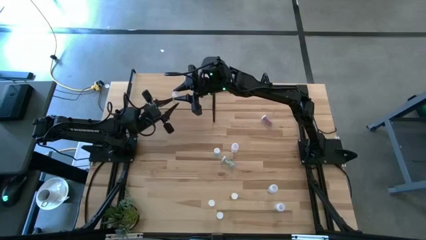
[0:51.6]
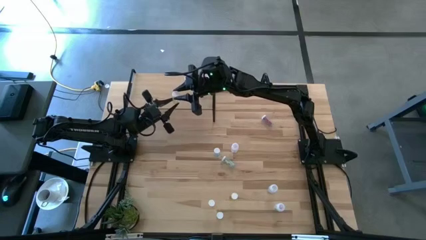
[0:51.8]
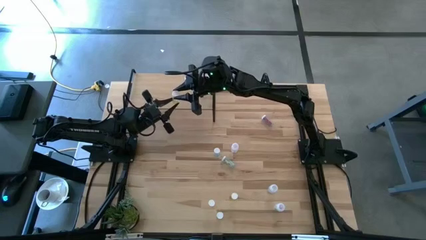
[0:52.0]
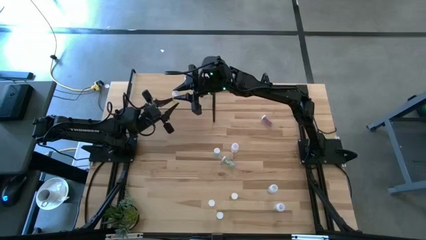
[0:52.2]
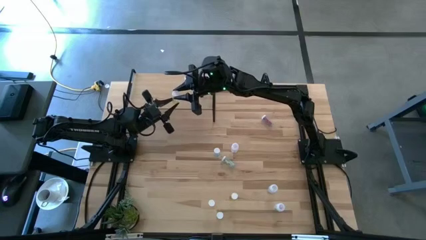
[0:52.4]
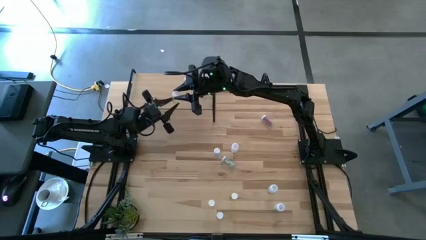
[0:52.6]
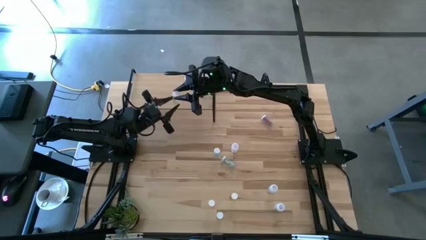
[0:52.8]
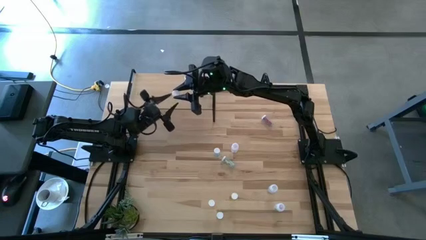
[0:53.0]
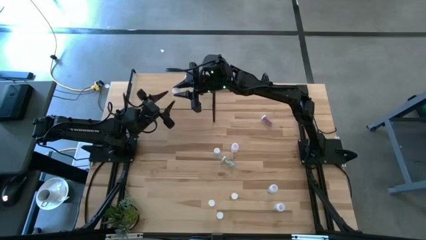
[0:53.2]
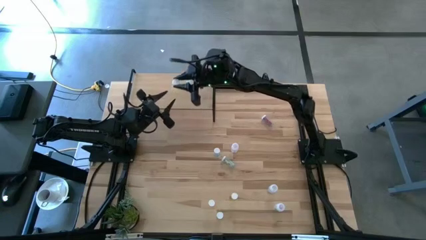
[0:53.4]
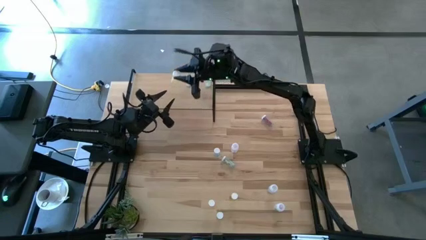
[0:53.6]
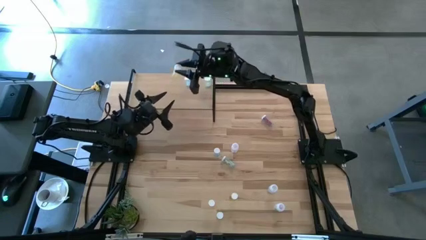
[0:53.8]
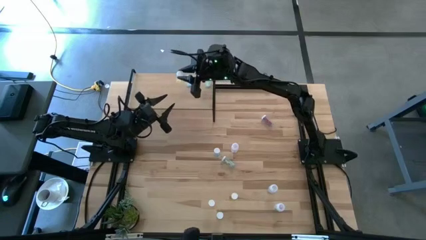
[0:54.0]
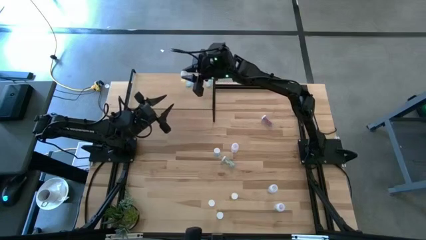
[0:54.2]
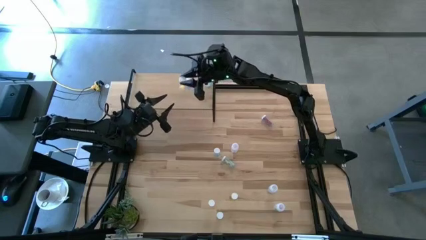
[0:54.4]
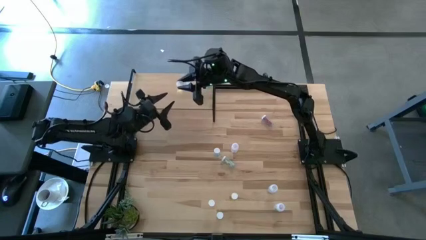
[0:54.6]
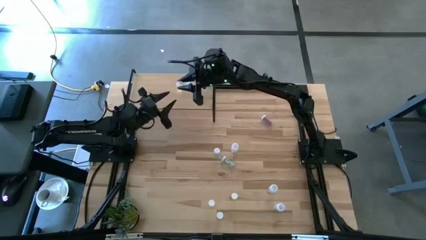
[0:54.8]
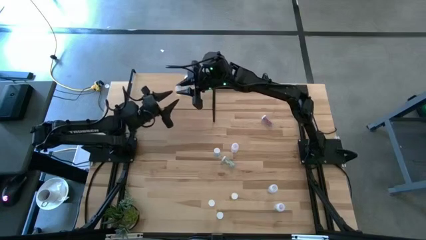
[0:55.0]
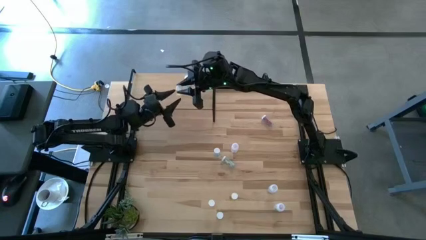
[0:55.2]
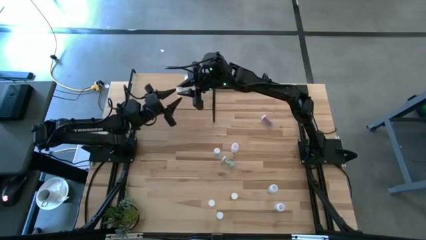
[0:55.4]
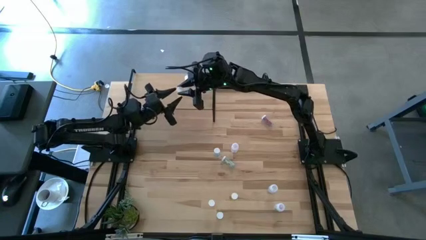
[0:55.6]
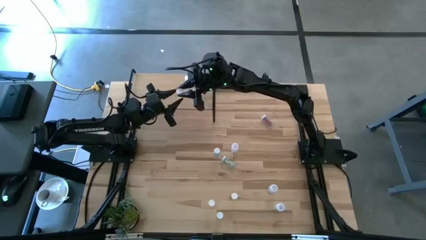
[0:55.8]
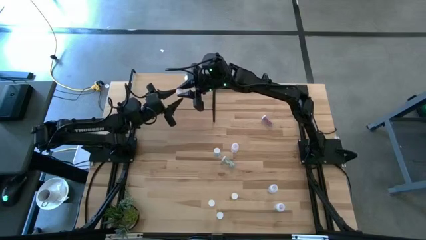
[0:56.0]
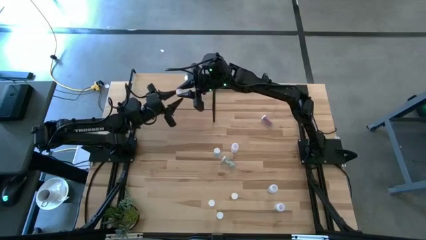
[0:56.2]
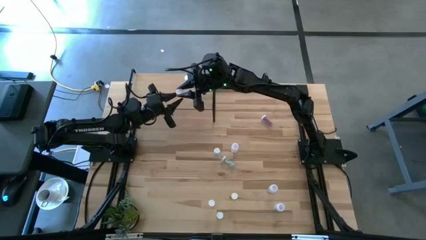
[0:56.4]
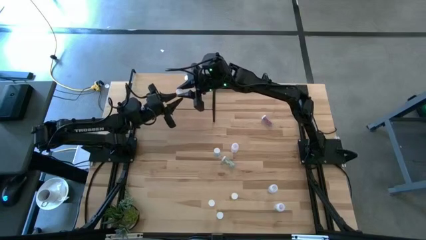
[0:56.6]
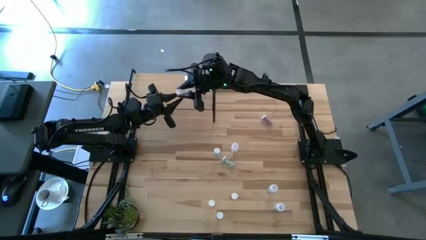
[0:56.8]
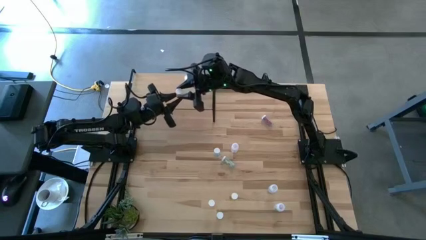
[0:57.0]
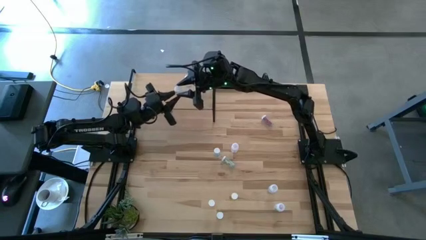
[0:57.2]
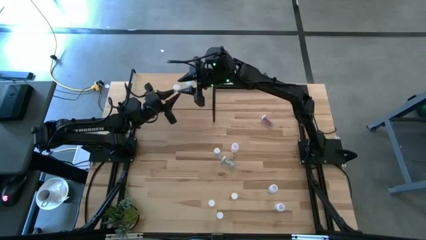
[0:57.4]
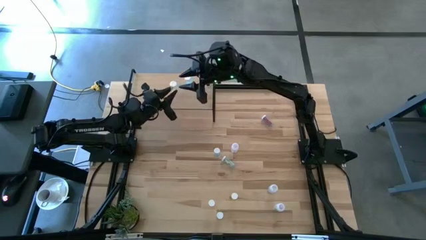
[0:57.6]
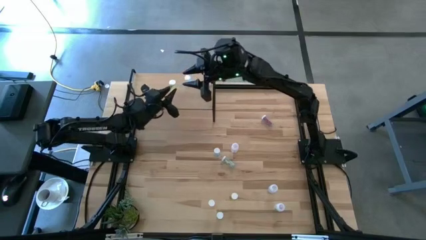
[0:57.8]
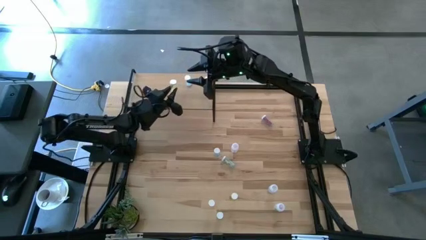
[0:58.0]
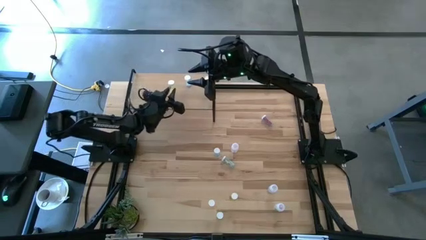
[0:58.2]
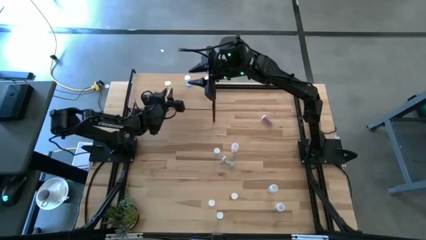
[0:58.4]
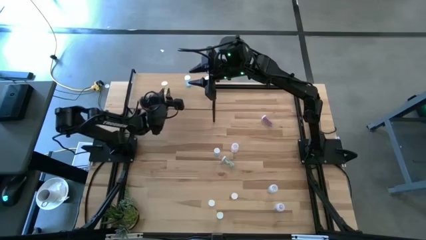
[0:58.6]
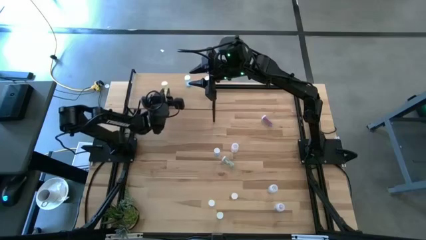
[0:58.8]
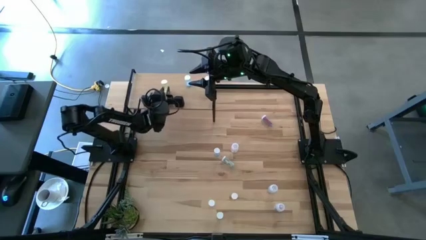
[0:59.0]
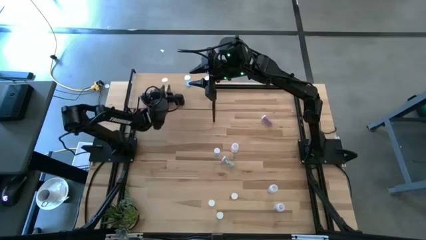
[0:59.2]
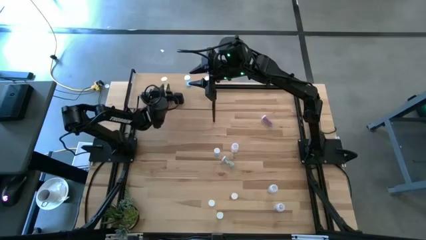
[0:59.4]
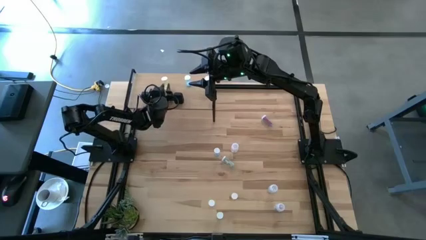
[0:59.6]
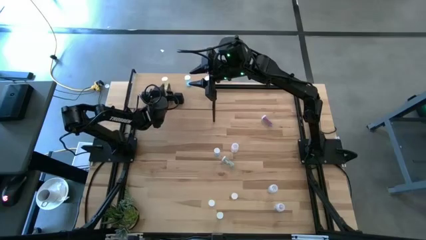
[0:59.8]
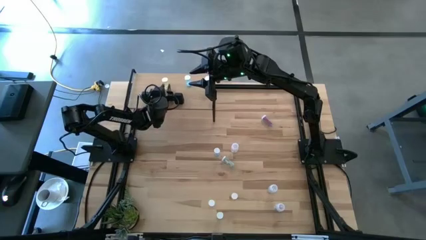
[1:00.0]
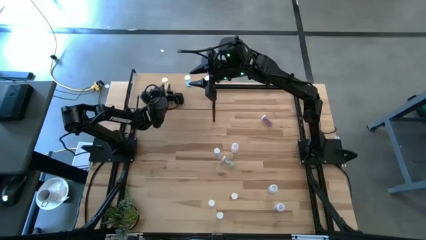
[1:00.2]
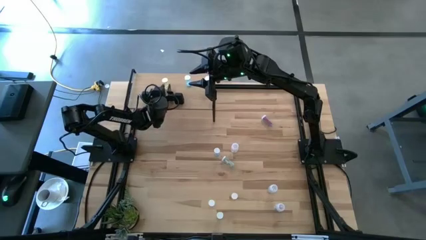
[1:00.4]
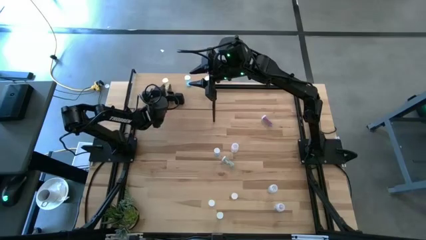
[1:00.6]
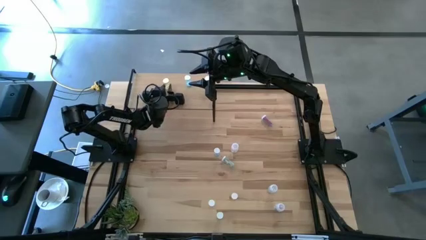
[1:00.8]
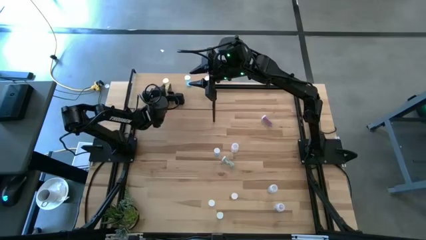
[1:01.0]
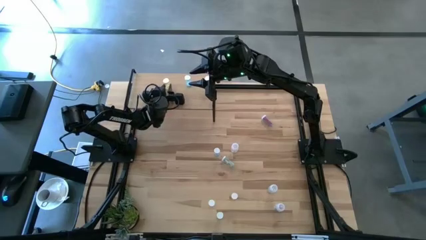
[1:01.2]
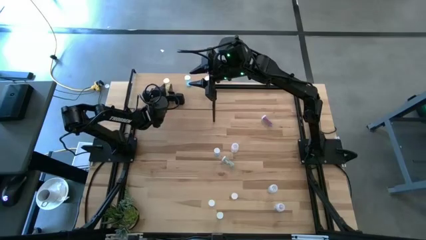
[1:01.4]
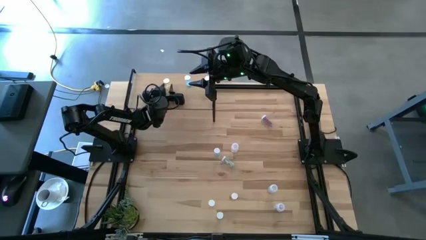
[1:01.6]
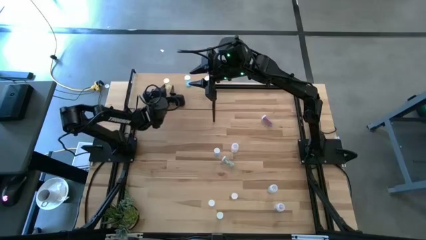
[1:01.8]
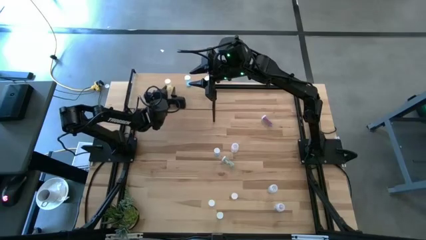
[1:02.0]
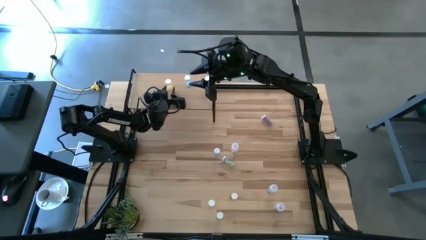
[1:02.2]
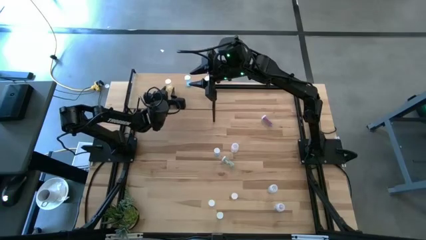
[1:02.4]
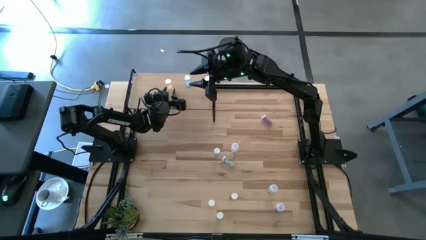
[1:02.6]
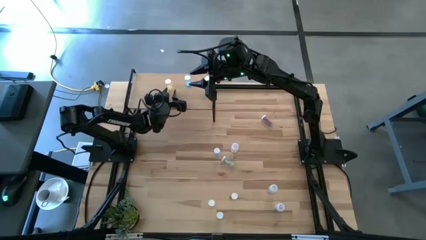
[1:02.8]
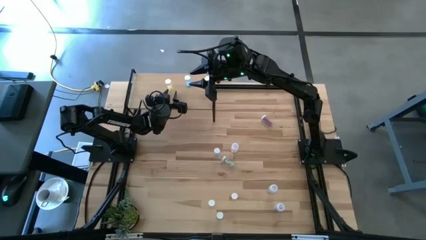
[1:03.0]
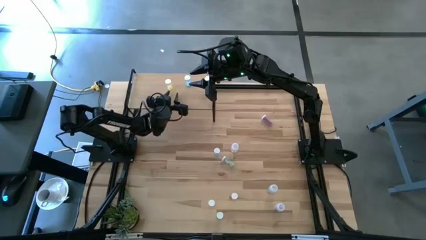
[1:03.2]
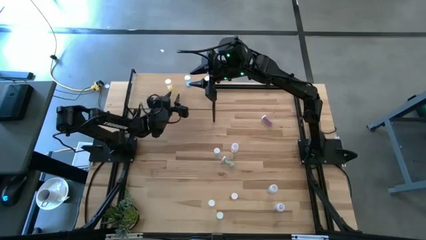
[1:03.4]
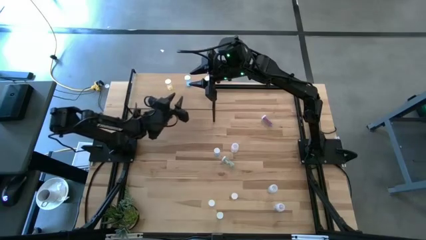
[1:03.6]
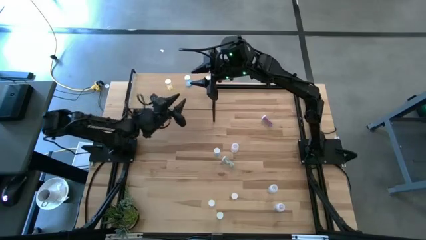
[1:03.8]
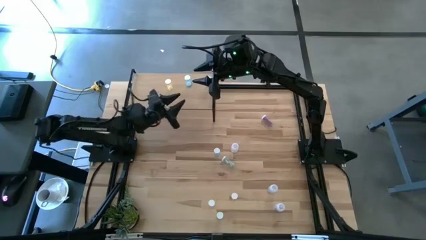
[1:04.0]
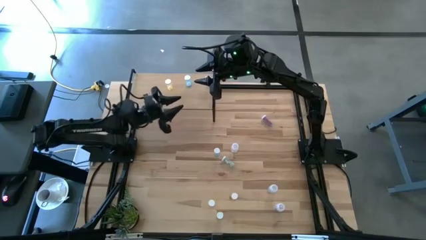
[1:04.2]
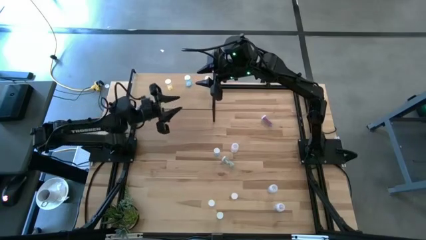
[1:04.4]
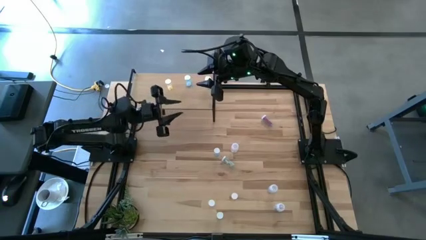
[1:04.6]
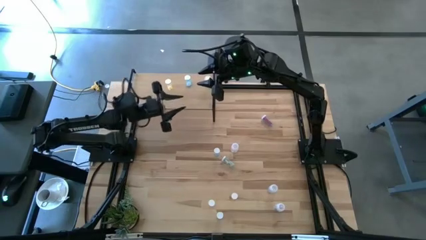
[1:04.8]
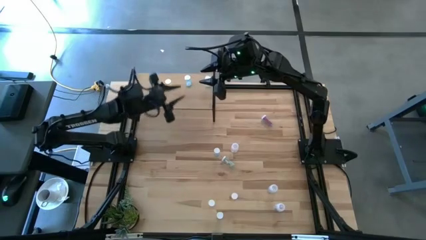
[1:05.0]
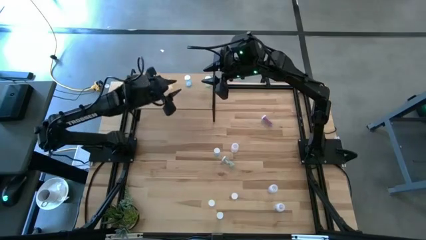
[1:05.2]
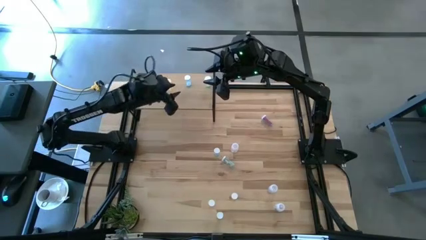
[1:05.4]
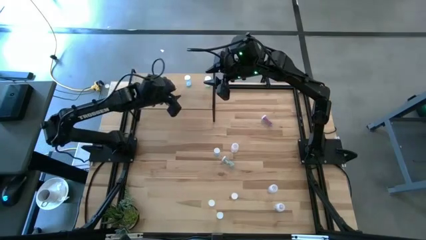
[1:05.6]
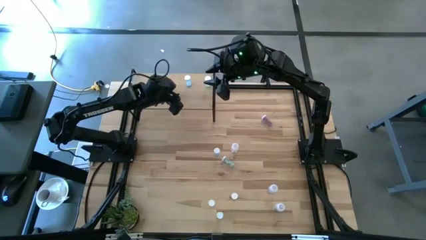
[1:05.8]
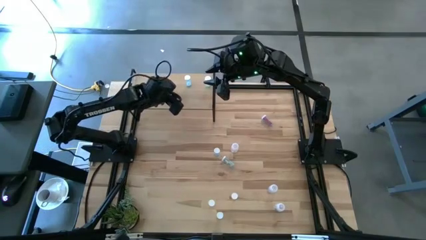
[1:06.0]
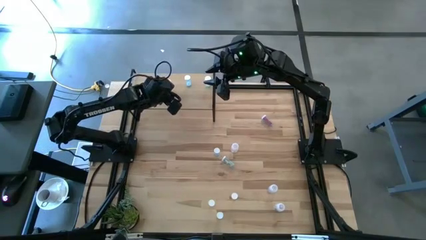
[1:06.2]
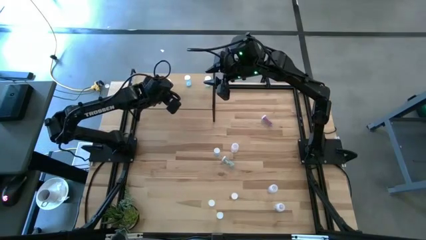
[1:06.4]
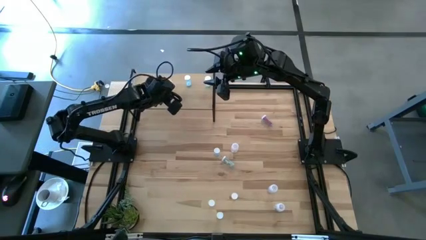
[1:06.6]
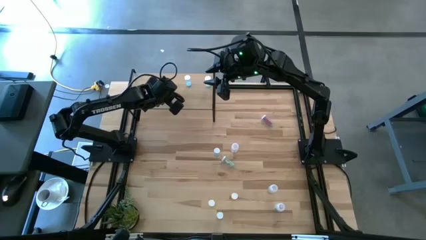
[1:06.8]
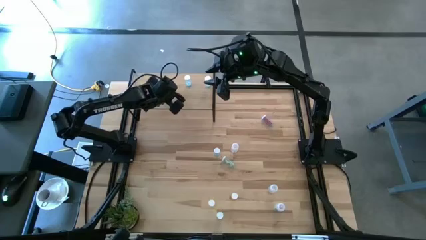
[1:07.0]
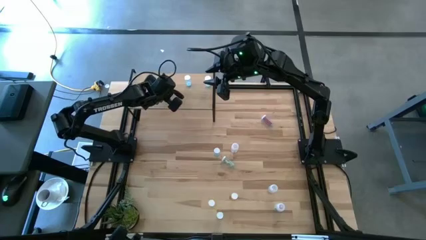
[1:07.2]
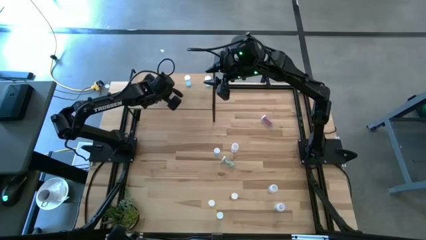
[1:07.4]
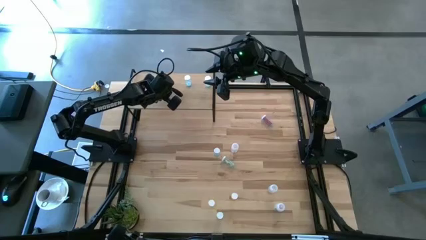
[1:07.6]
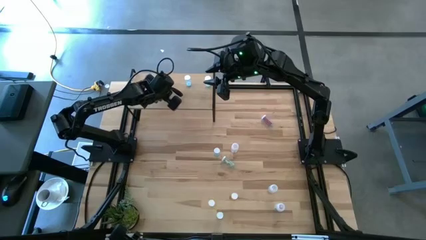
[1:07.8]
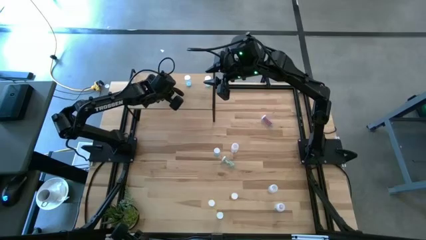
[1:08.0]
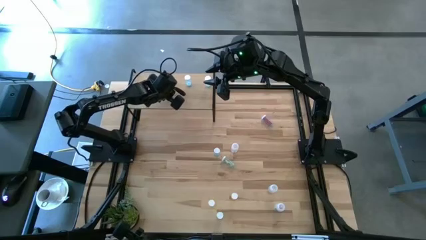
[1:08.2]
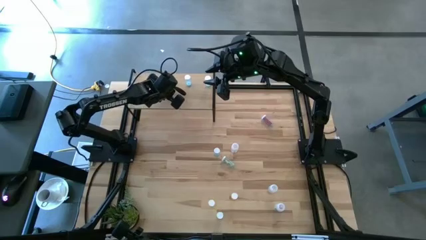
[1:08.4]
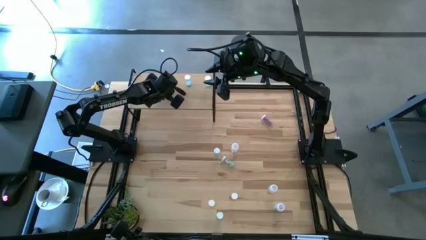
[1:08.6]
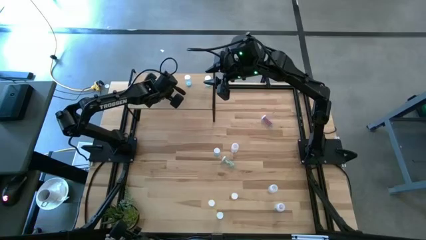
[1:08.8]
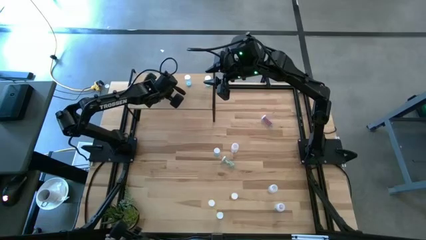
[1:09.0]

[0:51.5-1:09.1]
Task: Pick and place medicine bottles onto shelf by color
Put the top right yellow pill bottle on the shelf
